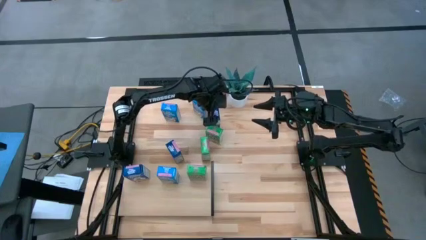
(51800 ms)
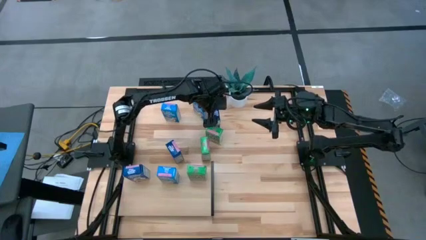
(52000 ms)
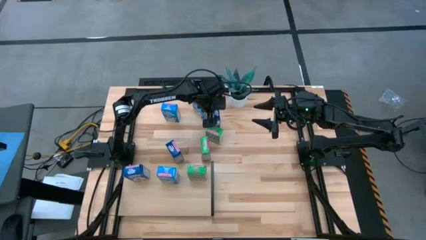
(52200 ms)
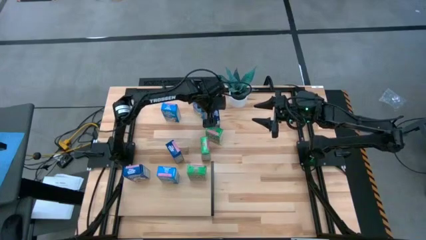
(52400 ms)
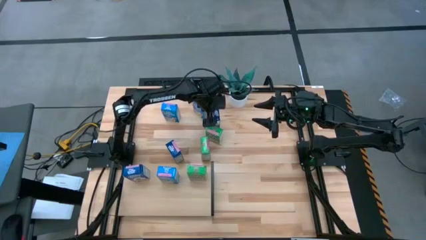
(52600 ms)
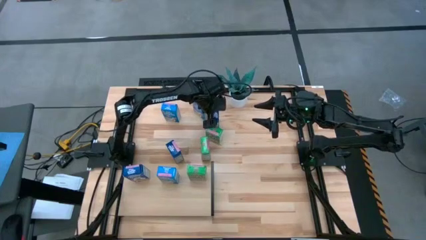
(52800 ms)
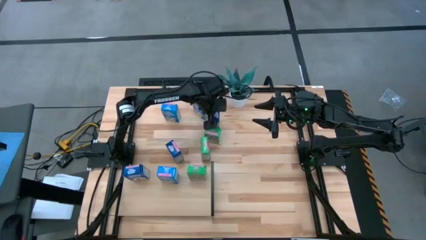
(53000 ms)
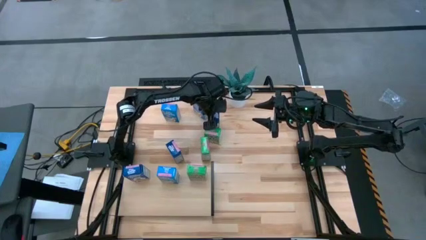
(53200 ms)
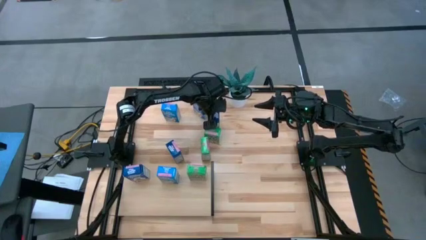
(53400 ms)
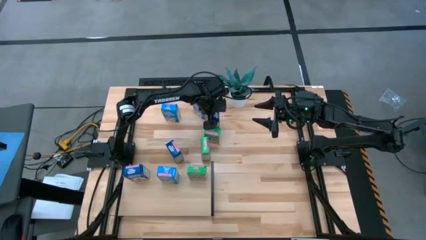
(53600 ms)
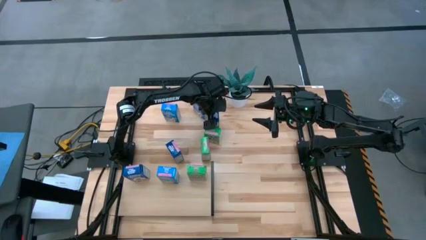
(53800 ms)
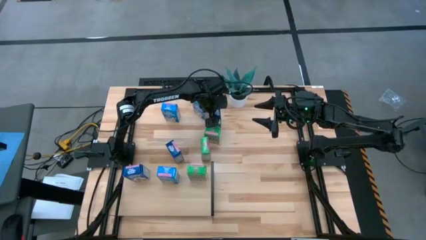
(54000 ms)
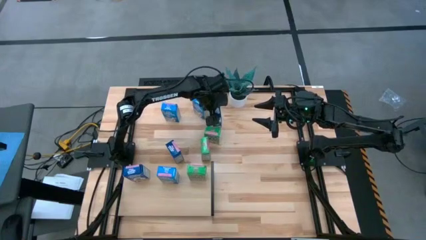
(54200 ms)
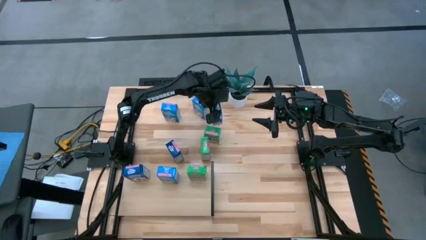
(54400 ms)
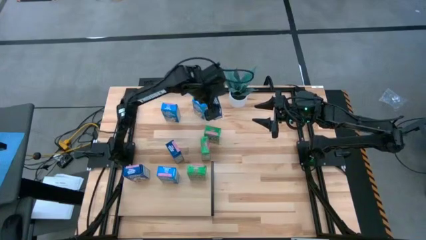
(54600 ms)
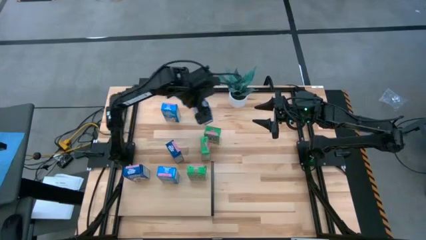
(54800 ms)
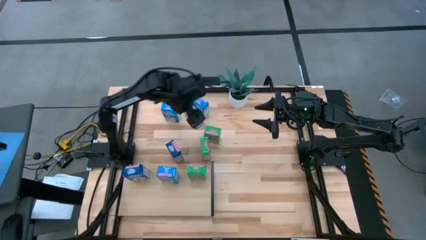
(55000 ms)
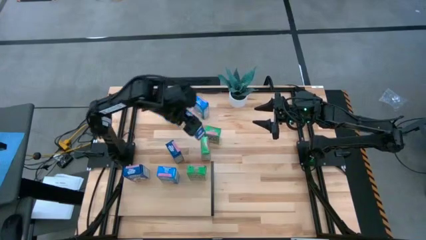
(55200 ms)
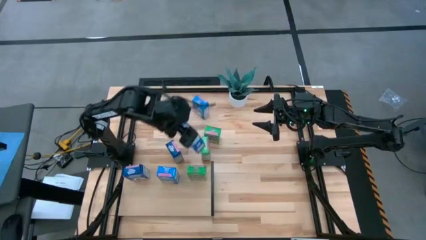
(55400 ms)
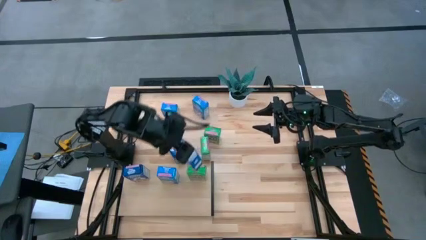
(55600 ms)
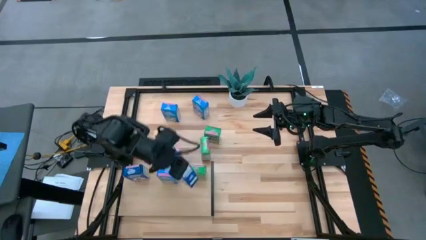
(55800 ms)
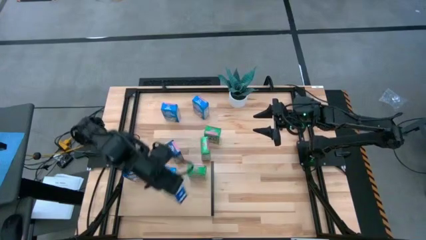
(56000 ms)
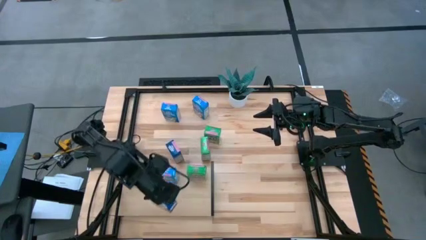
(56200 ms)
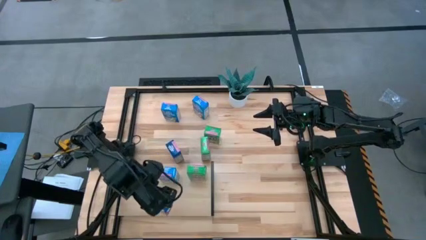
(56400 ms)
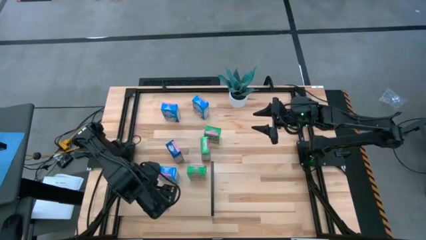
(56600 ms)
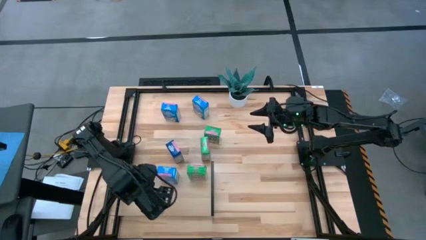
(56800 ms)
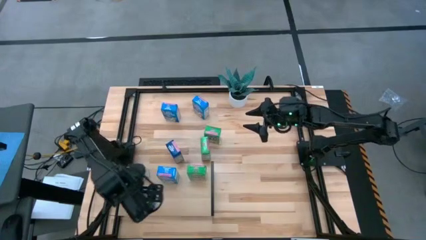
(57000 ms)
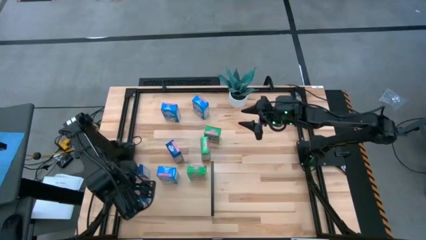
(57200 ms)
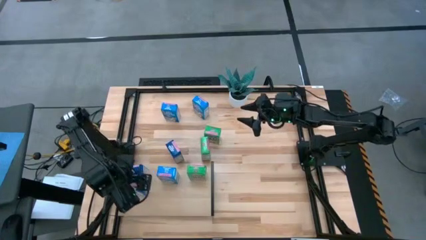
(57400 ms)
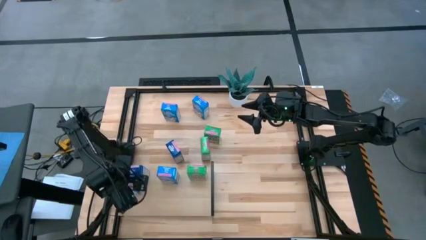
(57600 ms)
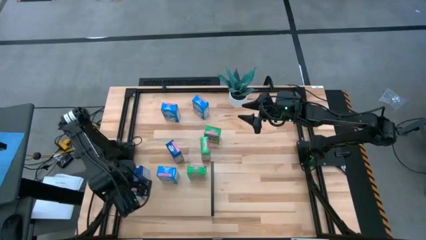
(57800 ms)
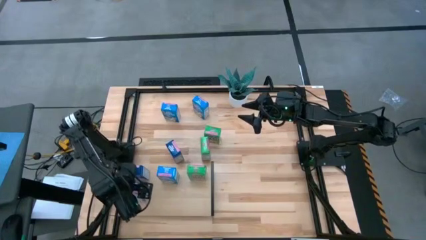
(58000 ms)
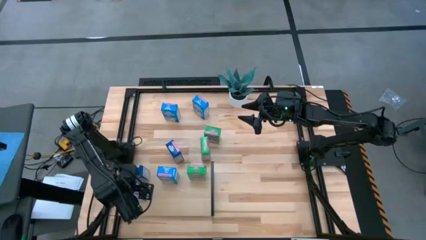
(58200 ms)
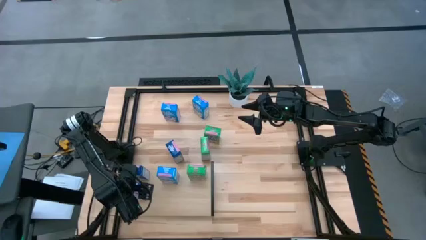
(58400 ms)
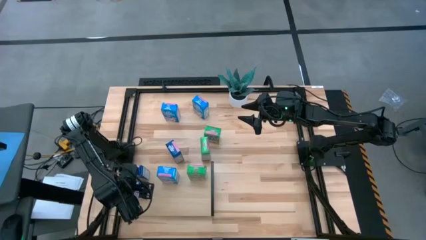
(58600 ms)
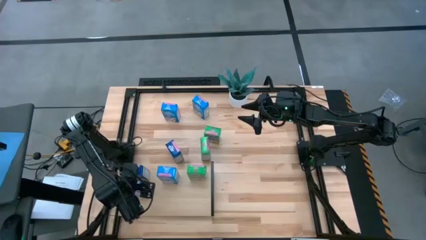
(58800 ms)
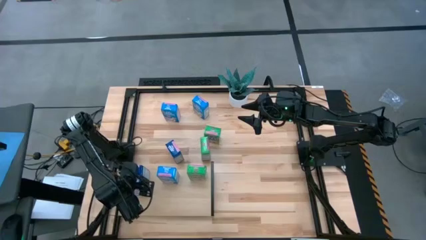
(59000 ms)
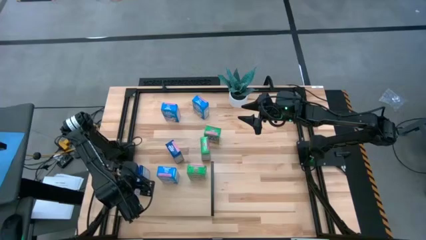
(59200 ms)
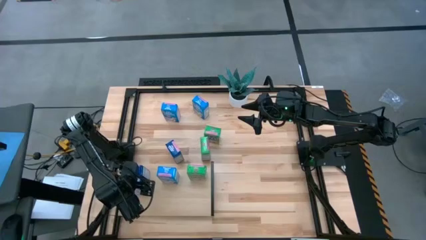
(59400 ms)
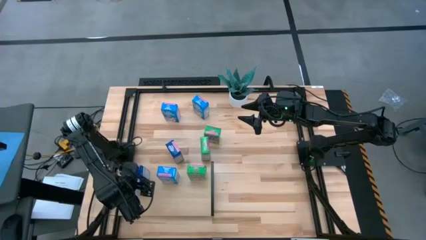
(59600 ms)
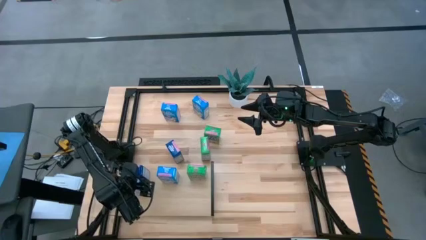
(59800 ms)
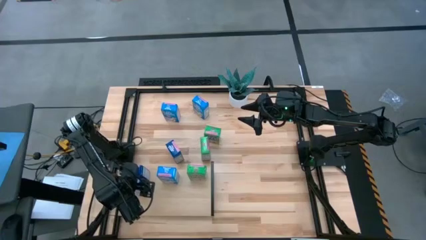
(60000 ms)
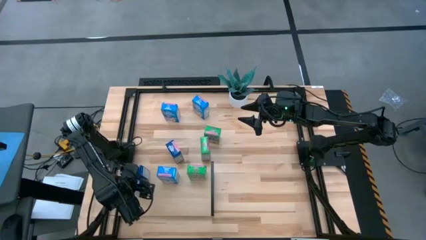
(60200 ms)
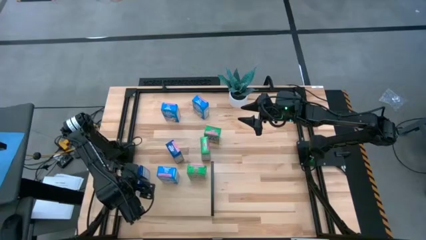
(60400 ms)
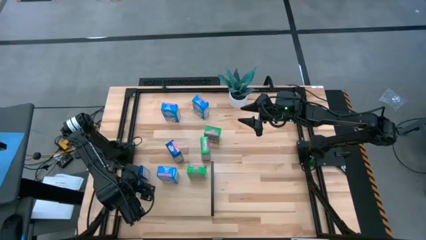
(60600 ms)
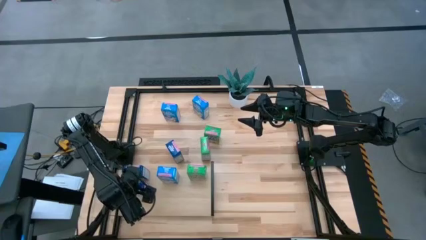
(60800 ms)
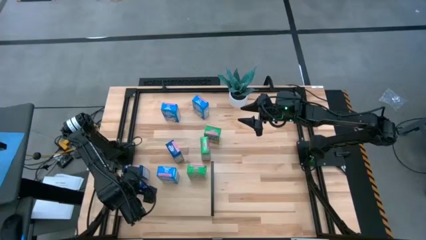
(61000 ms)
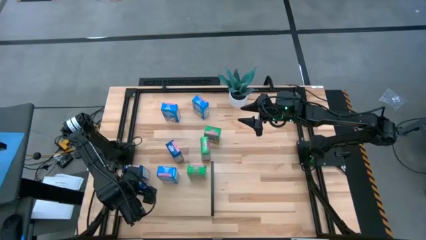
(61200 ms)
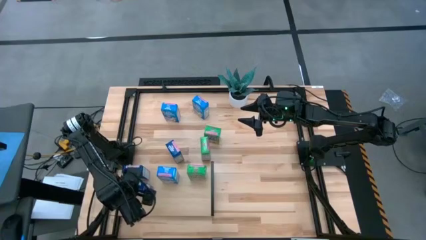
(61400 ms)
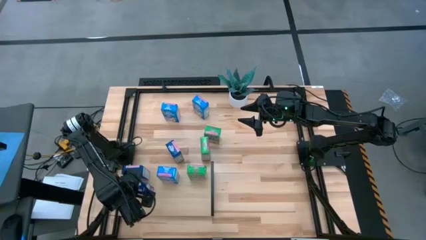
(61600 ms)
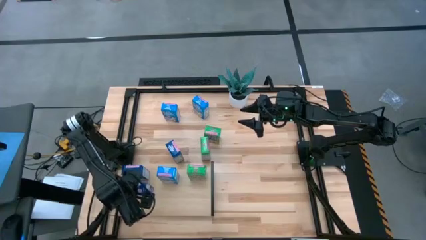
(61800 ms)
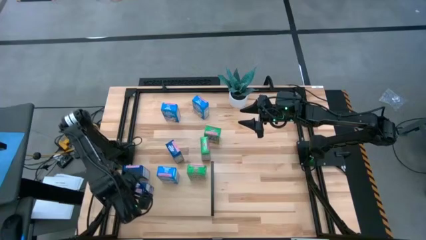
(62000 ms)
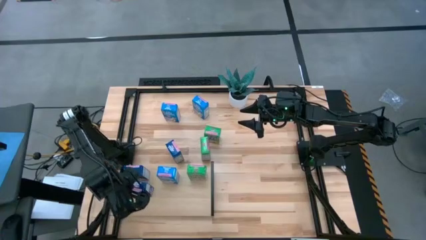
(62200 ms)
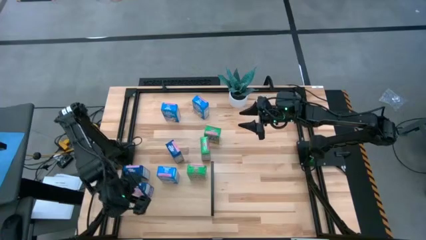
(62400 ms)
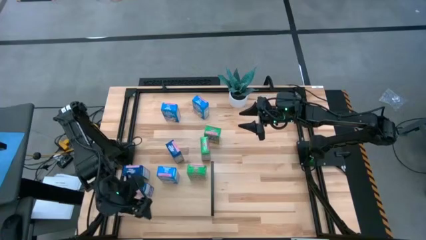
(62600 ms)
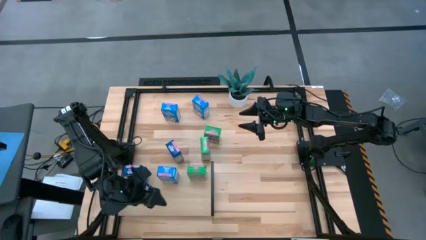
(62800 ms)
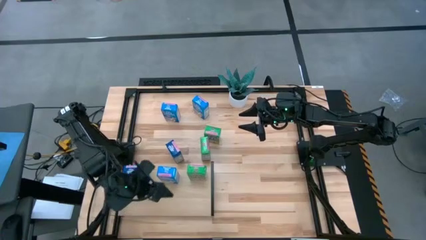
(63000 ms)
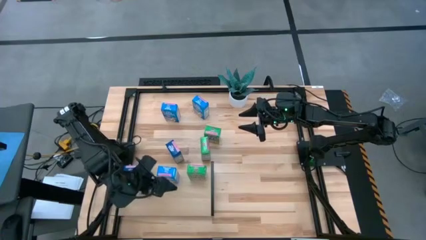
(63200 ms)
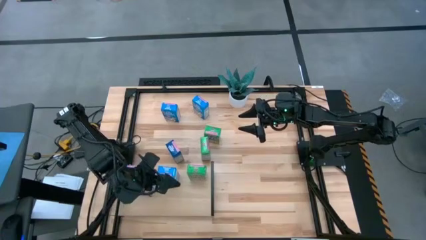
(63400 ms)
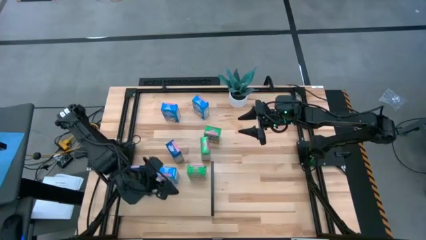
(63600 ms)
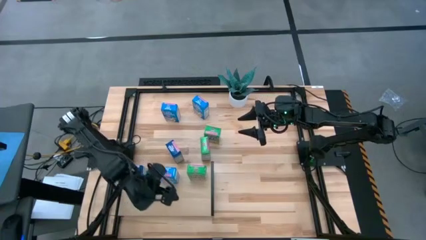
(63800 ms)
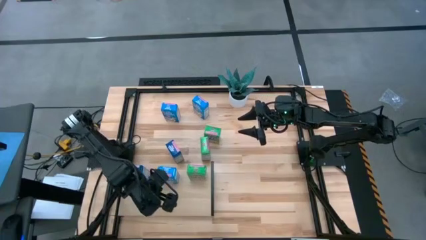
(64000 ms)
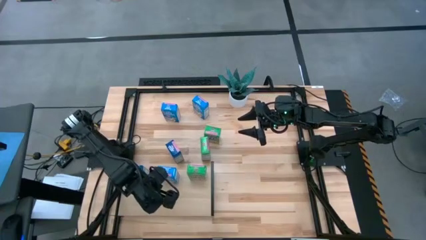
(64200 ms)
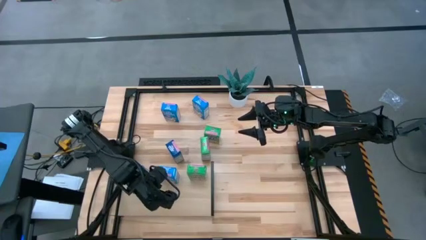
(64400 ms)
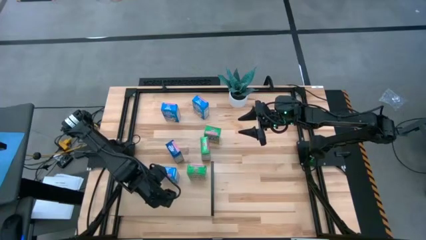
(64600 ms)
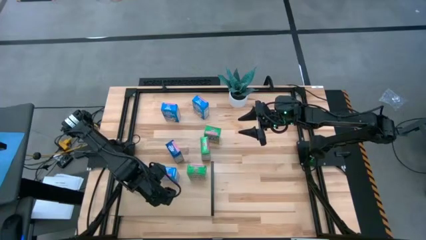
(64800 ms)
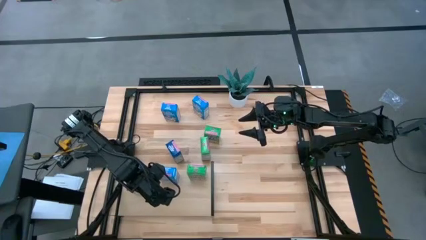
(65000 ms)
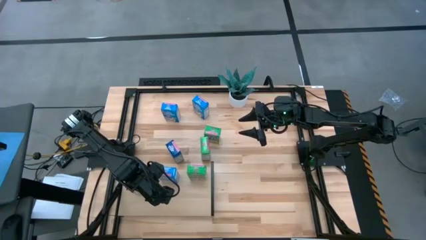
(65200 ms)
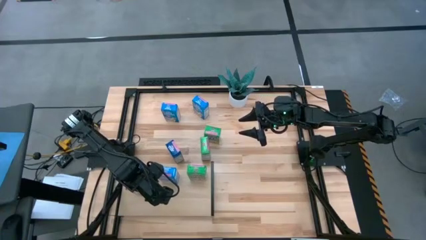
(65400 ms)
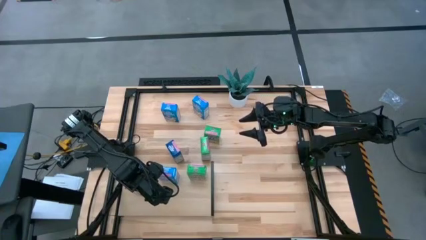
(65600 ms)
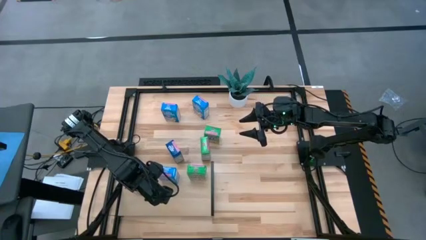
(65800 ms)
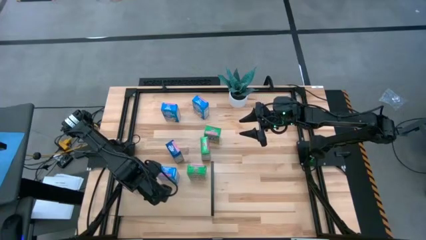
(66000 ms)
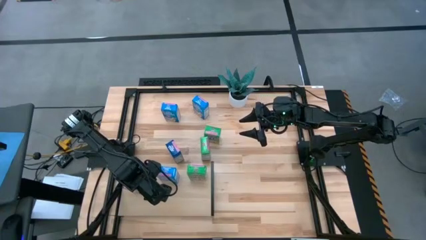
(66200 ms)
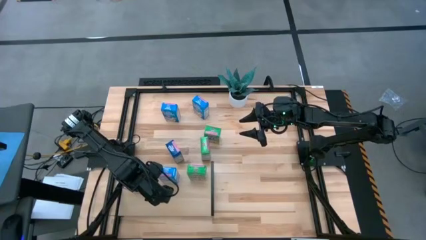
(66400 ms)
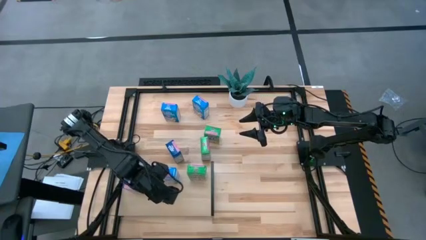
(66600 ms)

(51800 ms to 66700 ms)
Task: Stack cereal on shelf
Put the top blue cereal box on the shelf aligned with the other blue cereal boxes
